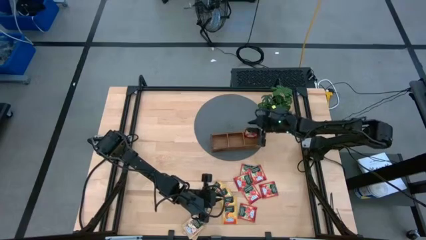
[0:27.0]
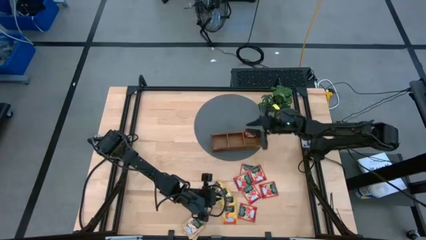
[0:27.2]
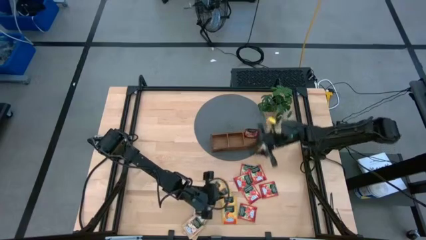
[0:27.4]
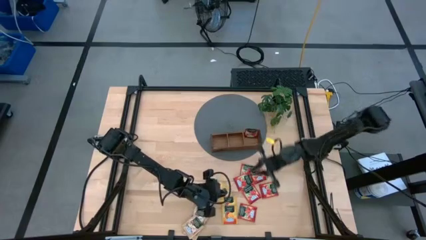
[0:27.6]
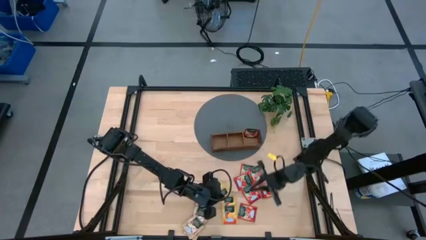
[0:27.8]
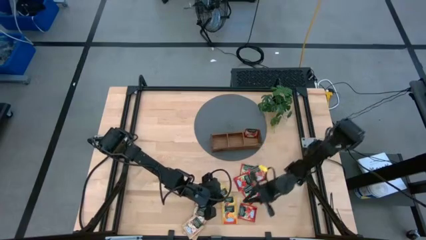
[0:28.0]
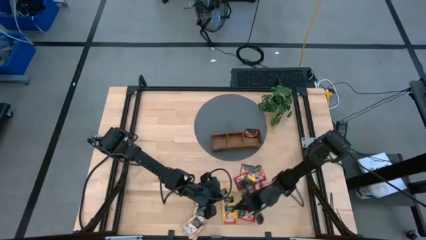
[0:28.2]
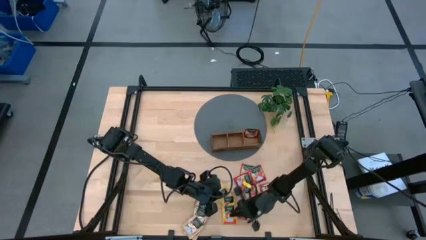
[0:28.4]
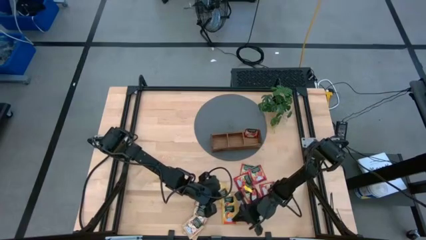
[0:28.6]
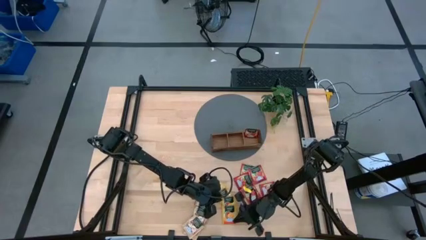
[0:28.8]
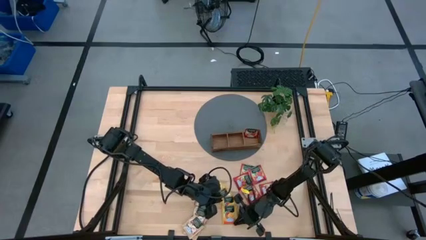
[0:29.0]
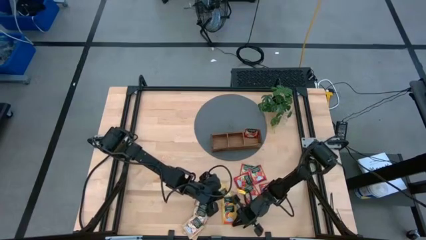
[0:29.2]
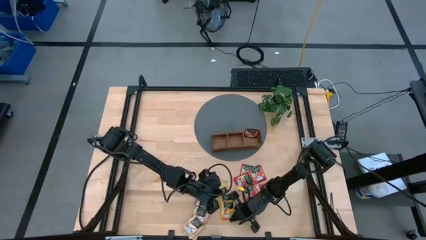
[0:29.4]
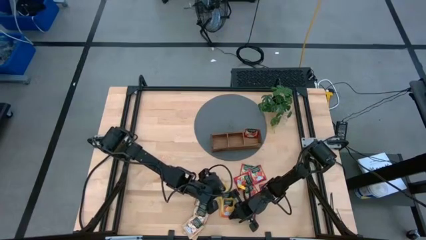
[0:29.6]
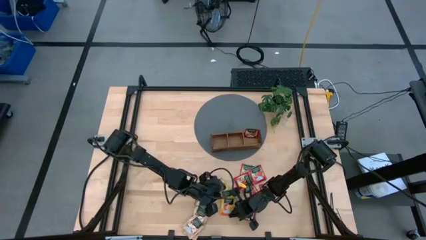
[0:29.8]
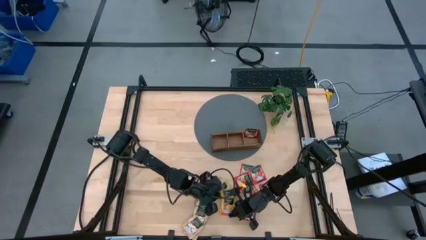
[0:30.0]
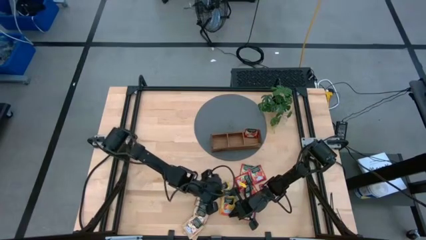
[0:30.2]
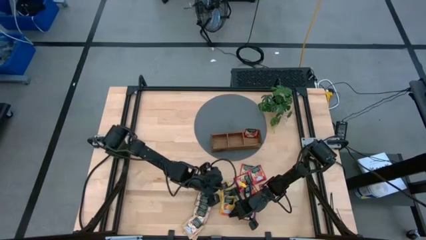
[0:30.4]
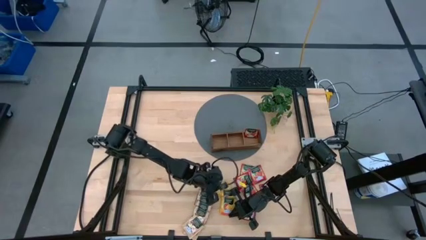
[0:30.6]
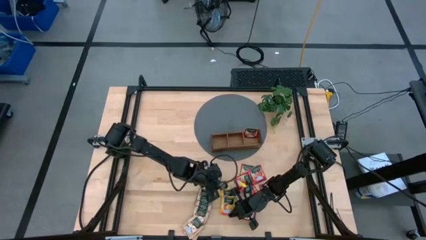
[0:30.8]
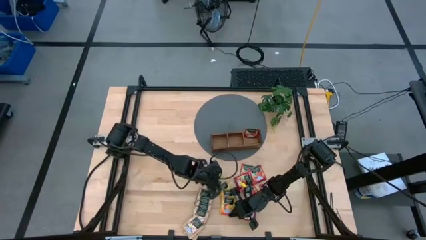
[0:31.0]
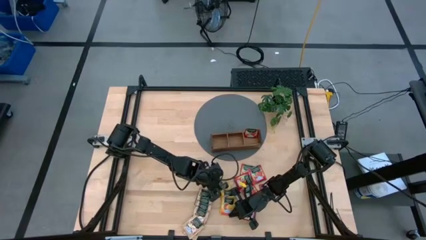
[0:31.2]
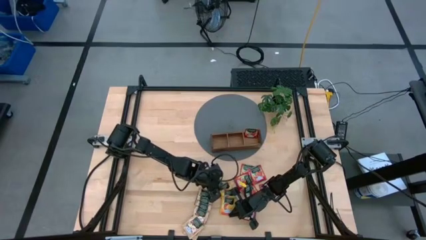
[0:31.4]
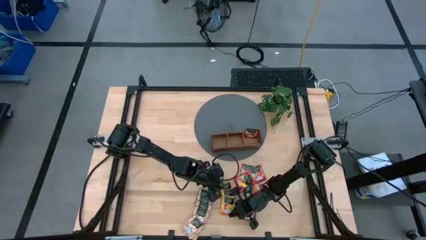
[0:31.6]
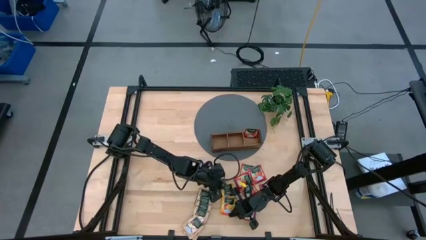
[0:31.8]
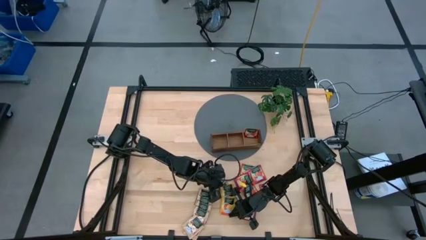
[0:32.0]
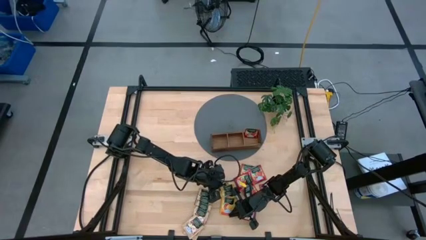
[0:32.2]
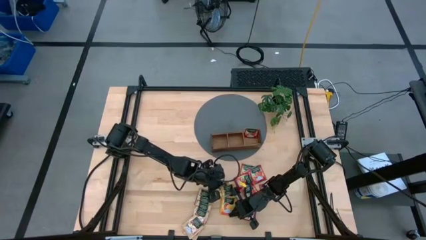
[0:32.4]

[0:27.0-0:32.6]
Task: Pick & Place Tea
Put the orange tea bag into the middle section of the wooden organizer

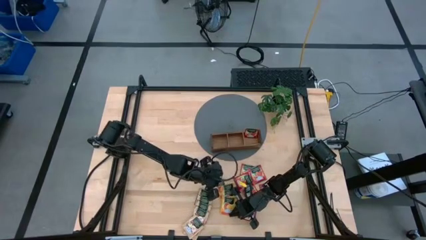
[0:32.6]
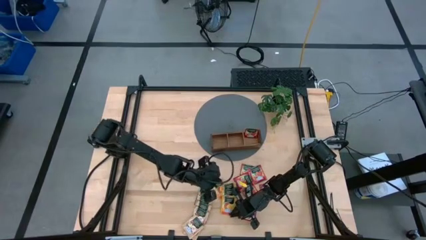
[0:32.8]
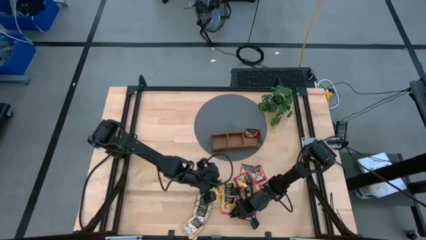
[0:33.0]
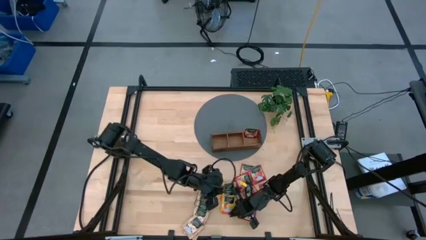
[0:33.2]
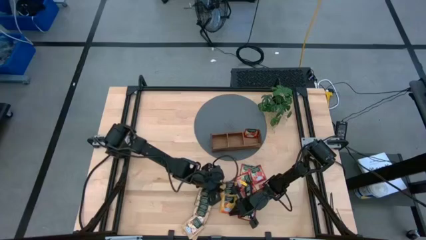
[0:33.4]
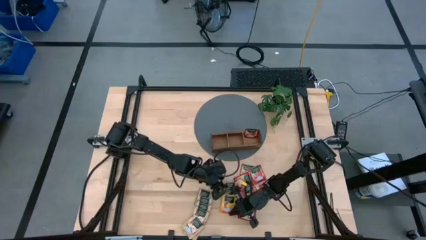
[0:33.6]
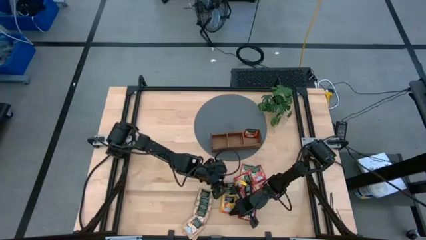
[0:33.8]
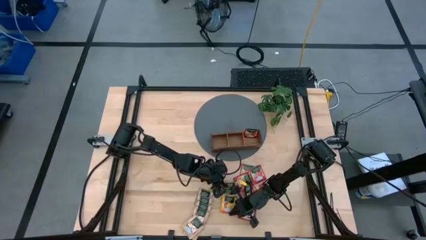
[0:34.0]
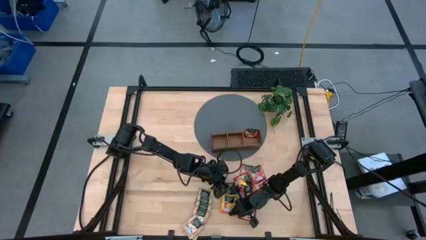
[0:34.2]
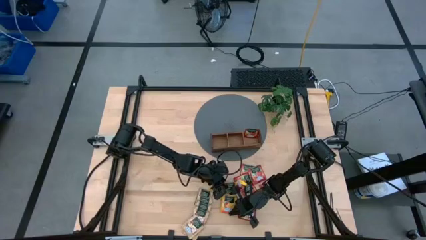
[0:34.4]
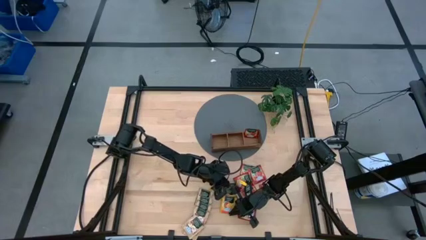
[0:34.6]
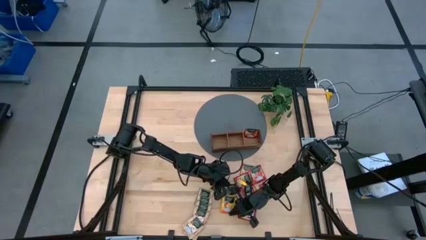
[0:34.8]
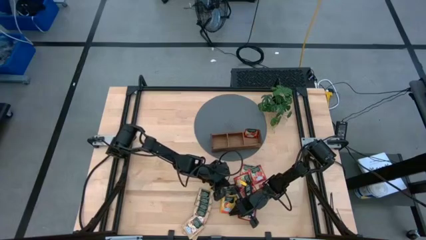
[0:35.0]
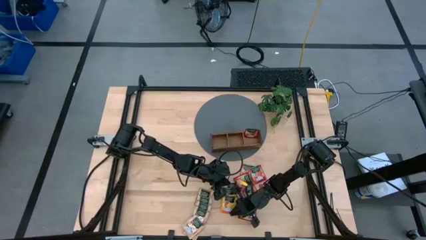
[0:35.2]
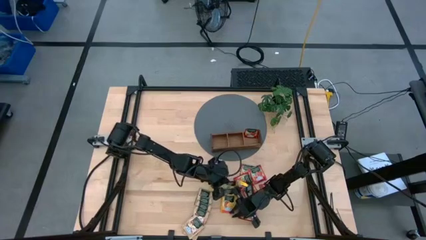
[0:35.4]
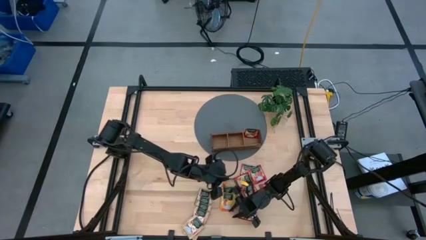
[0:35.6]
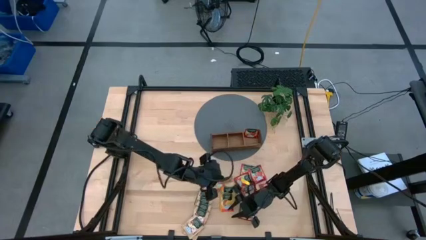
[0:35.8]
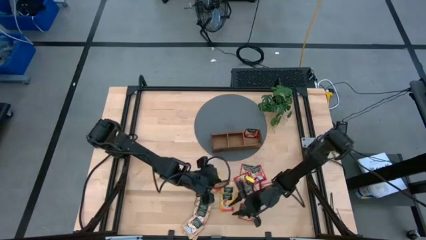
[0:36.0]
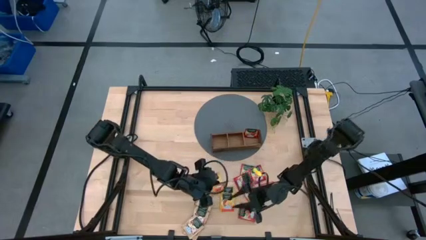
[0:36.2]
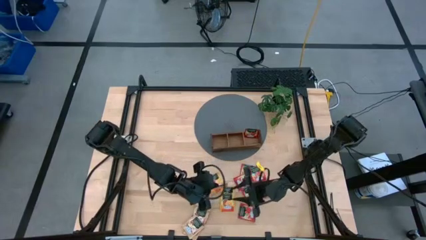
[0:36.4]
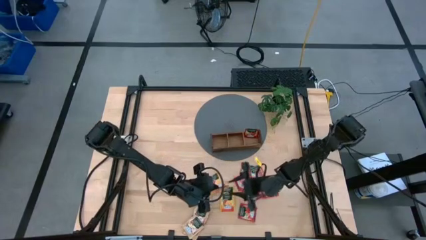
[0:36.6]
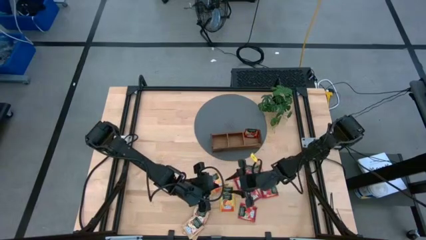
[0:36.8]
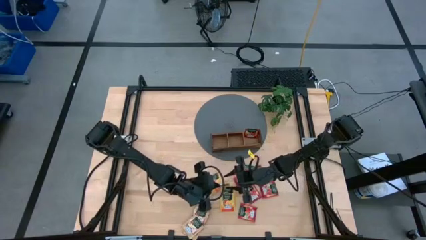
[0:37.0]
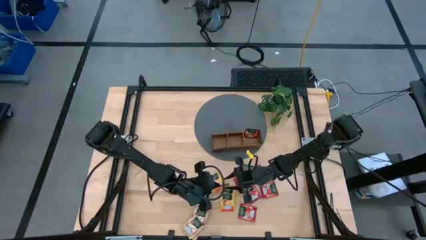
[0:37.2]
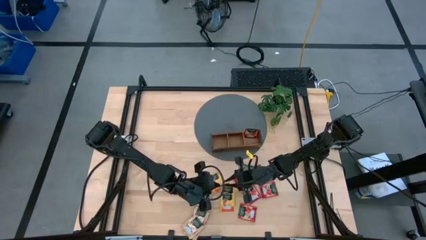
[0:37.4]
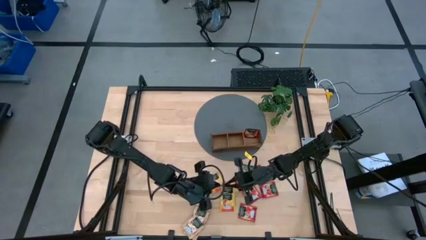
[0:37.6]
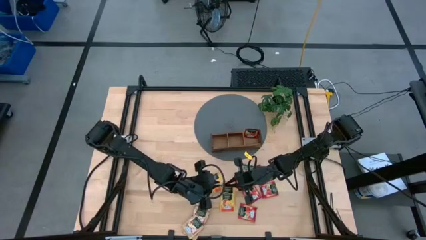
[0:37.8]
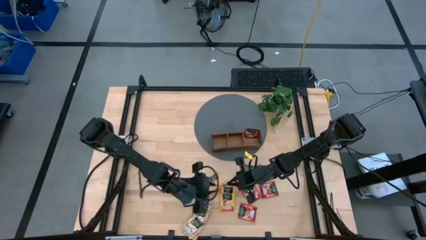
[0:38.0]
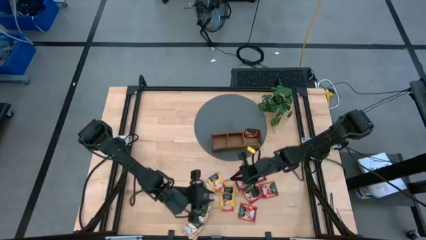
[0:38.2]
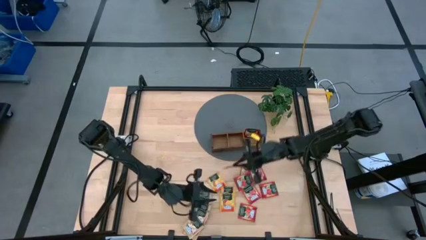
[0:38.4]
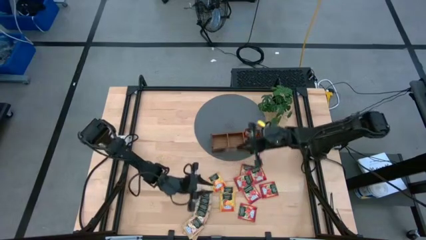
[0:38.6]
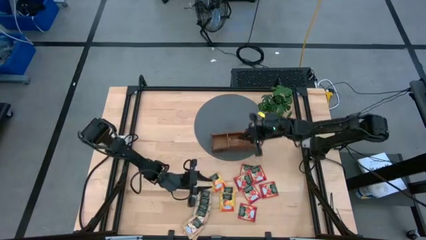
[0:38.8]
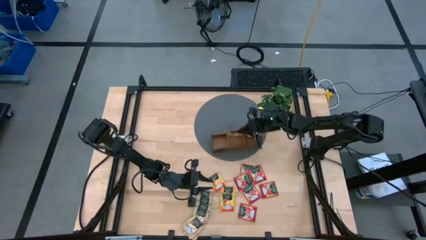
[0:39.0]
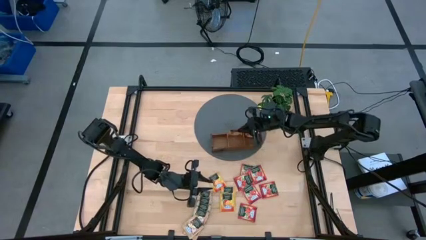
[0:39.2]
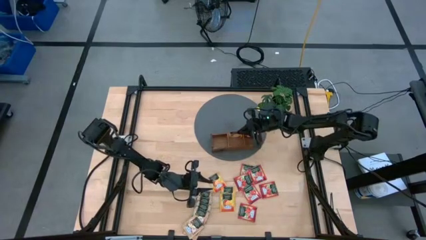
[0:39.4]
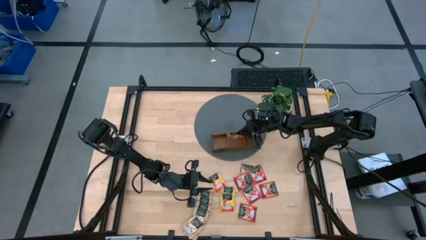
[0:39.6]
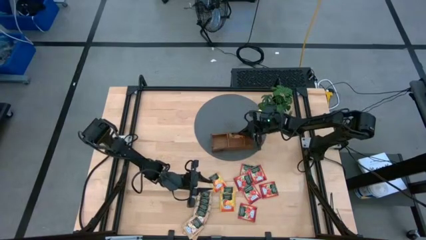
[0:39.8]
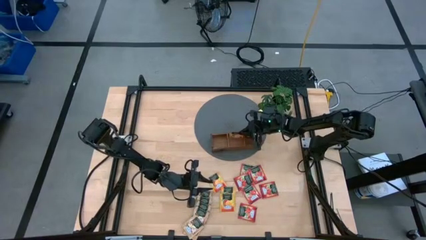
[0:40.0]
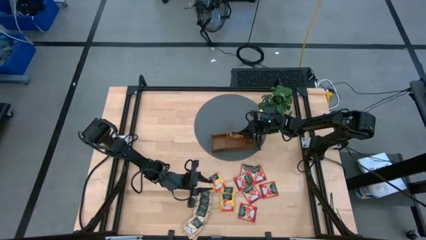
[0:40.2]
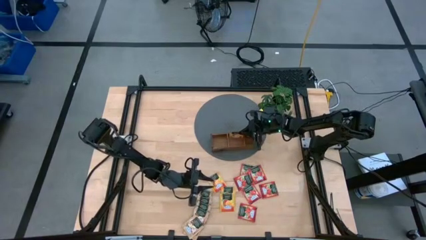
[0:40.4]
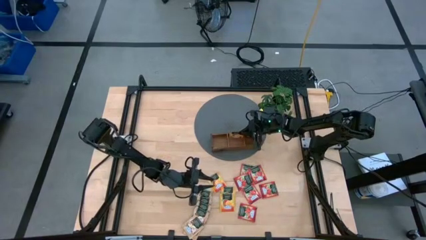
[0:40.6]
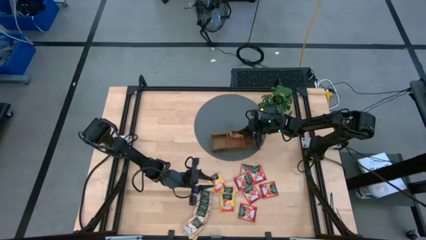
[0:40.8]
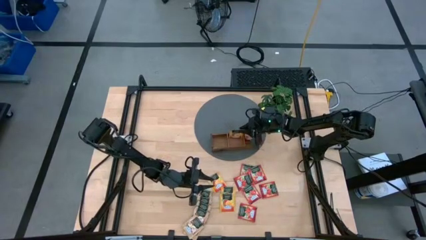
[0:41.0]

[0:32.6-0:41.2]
Put the orange tea bag into the middle section of the wooden organizer
